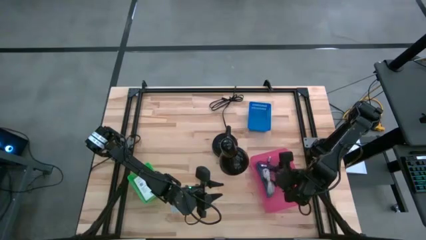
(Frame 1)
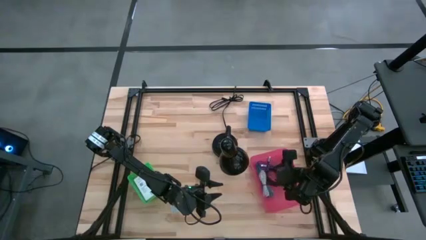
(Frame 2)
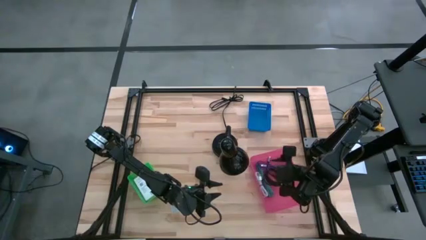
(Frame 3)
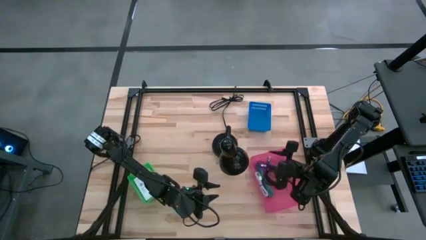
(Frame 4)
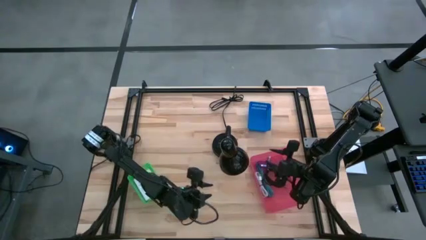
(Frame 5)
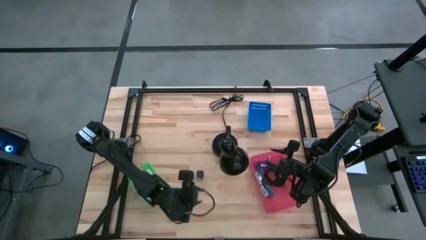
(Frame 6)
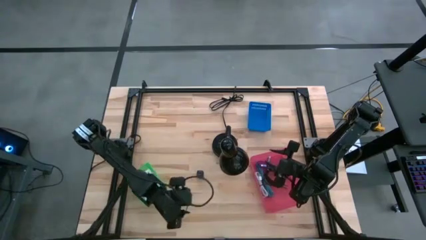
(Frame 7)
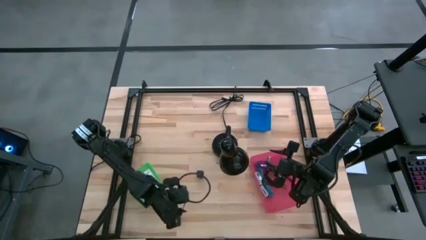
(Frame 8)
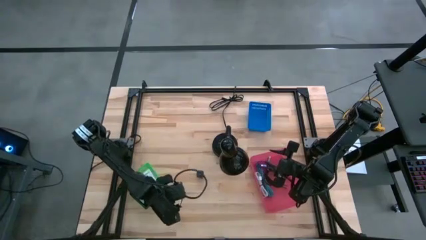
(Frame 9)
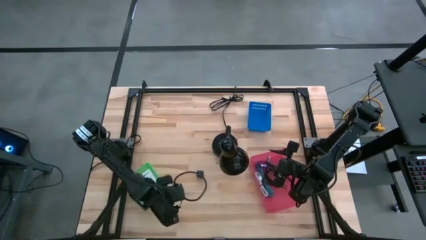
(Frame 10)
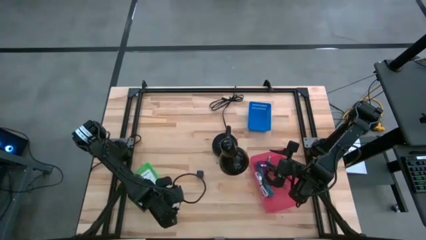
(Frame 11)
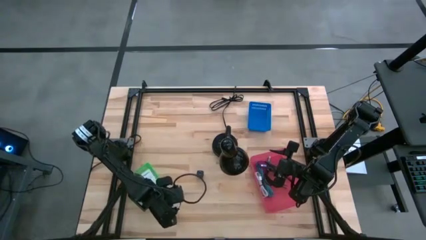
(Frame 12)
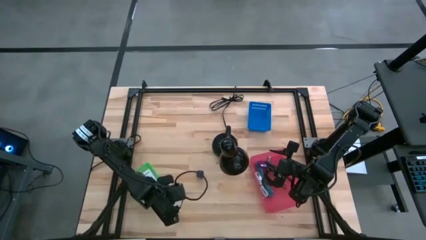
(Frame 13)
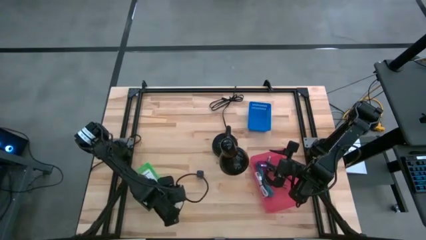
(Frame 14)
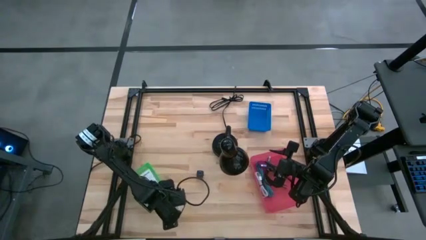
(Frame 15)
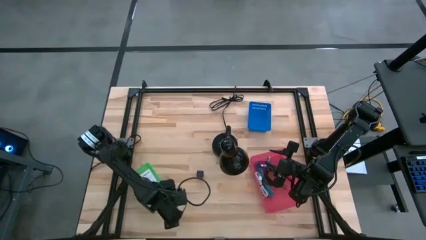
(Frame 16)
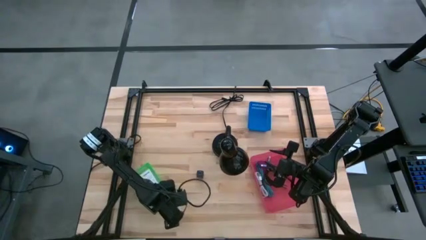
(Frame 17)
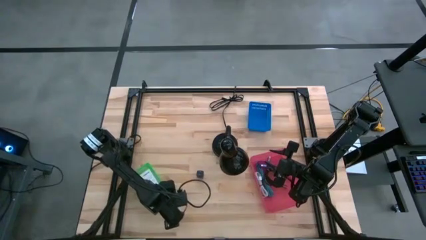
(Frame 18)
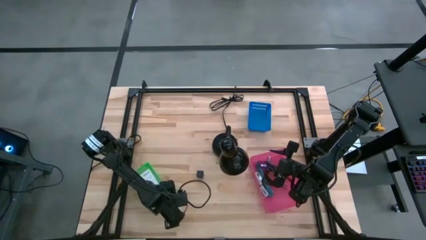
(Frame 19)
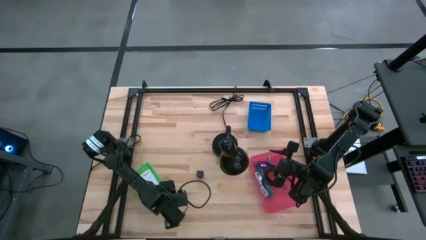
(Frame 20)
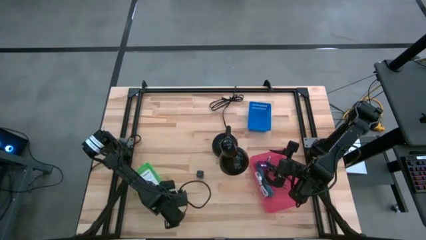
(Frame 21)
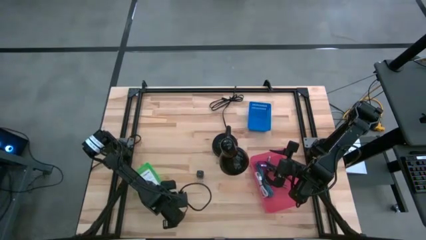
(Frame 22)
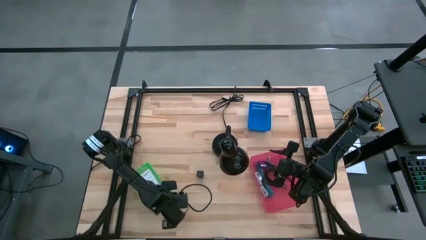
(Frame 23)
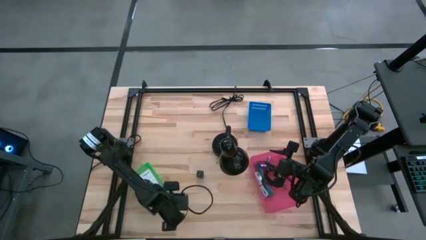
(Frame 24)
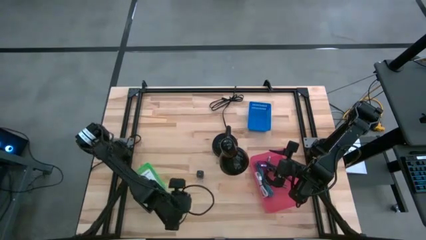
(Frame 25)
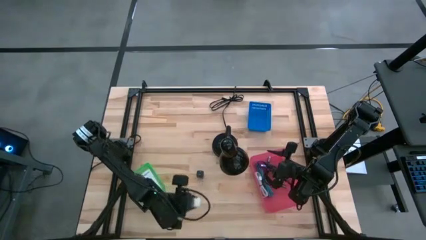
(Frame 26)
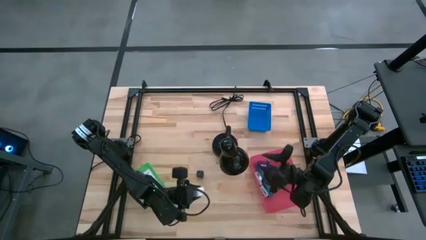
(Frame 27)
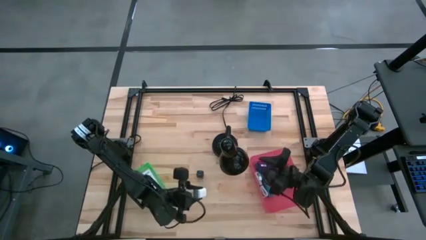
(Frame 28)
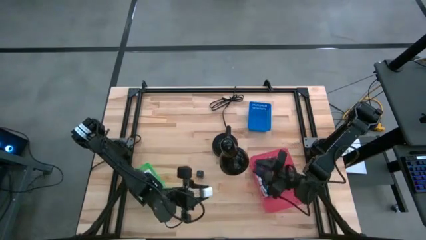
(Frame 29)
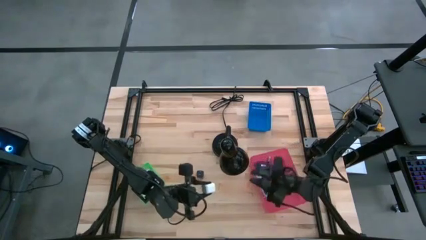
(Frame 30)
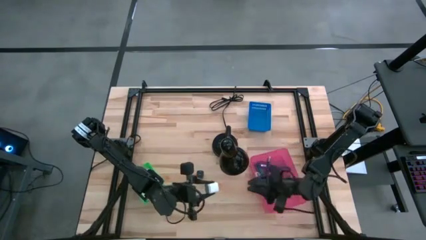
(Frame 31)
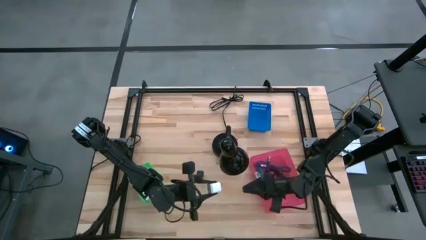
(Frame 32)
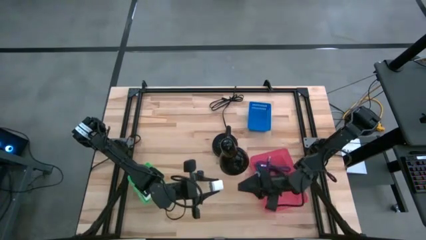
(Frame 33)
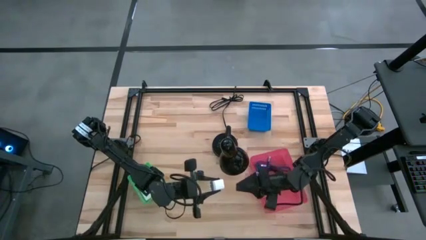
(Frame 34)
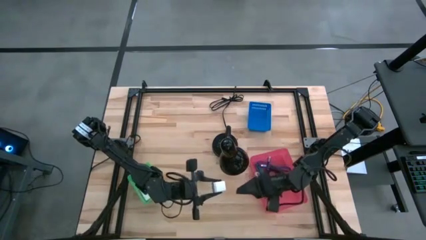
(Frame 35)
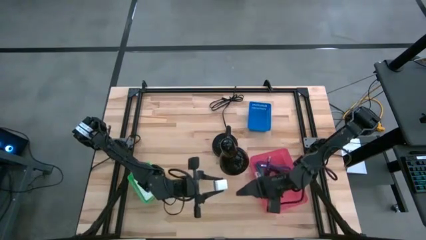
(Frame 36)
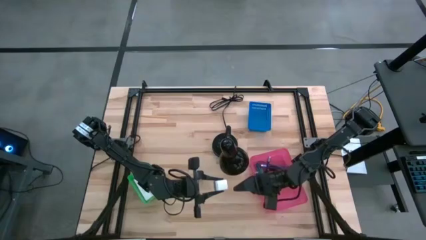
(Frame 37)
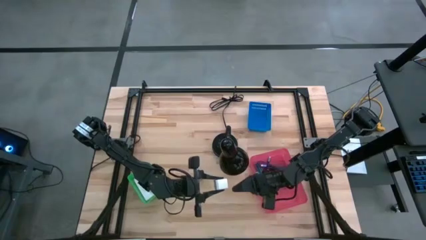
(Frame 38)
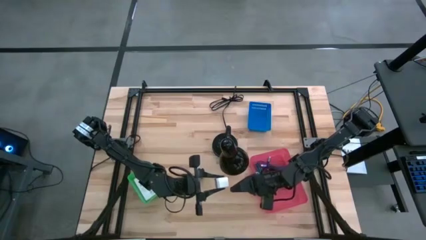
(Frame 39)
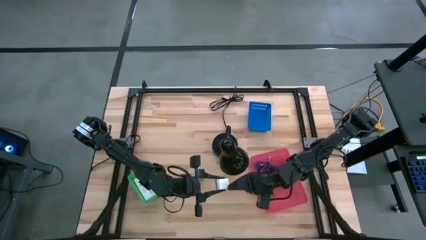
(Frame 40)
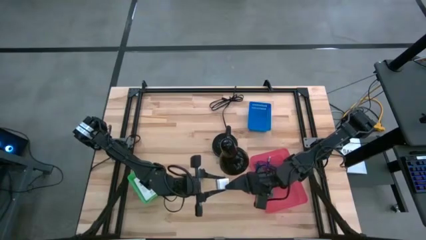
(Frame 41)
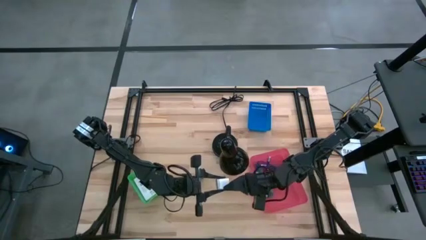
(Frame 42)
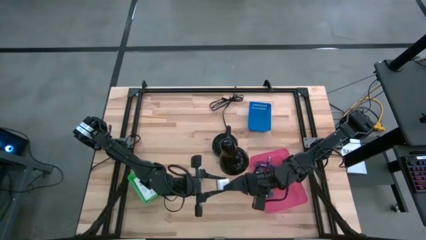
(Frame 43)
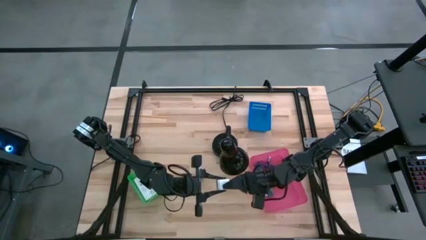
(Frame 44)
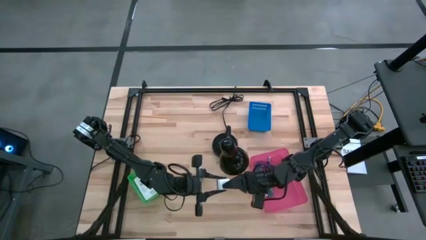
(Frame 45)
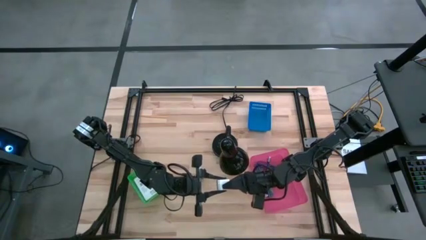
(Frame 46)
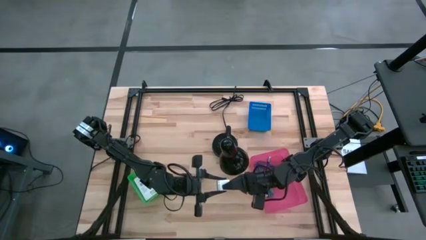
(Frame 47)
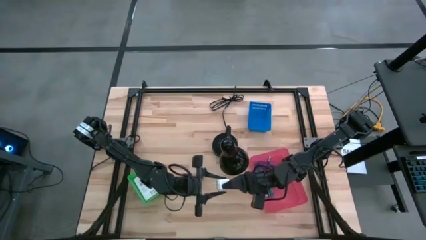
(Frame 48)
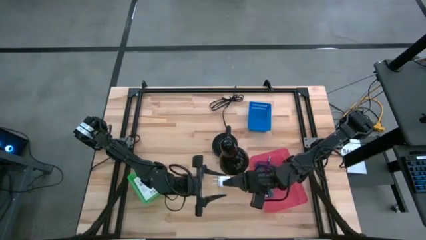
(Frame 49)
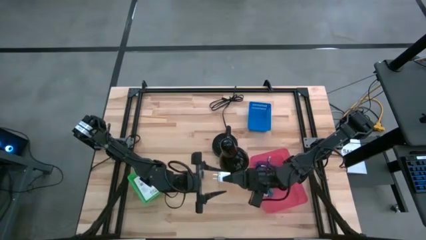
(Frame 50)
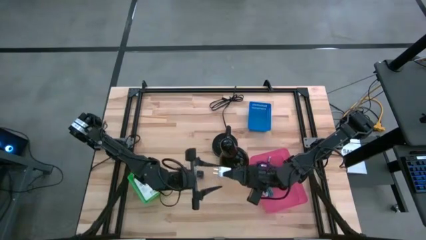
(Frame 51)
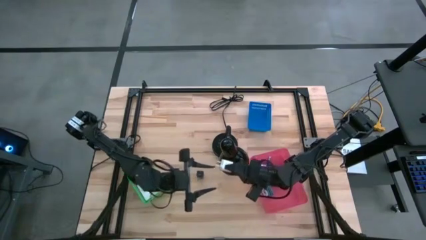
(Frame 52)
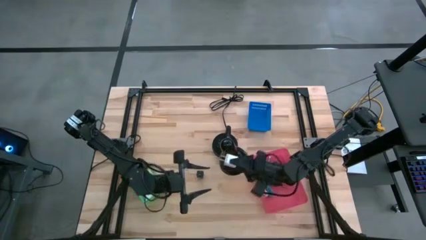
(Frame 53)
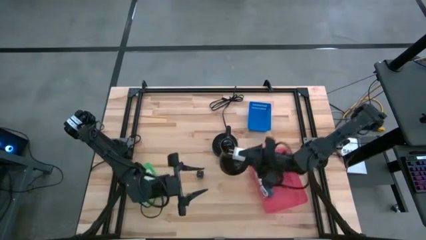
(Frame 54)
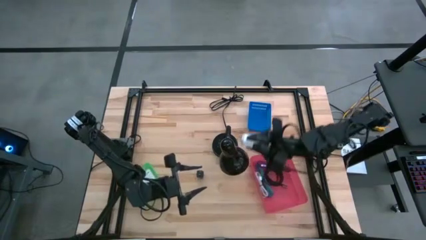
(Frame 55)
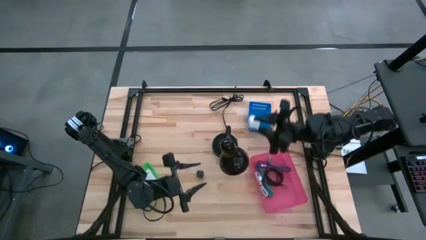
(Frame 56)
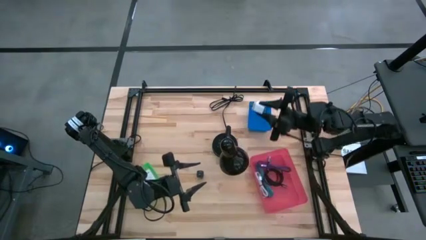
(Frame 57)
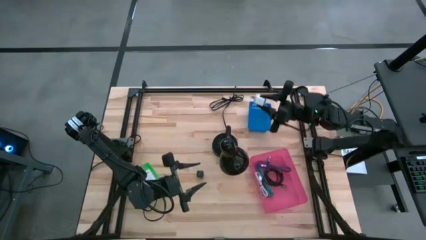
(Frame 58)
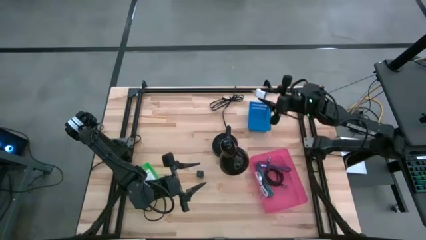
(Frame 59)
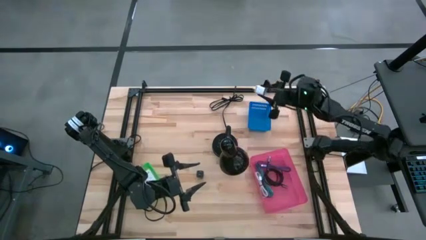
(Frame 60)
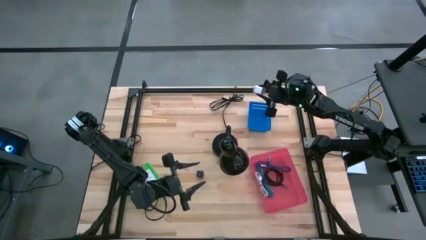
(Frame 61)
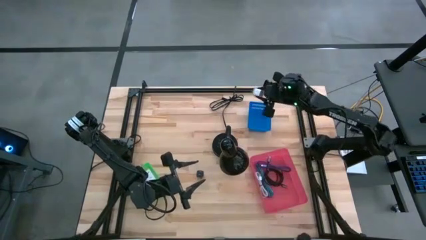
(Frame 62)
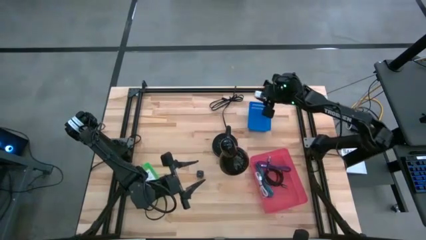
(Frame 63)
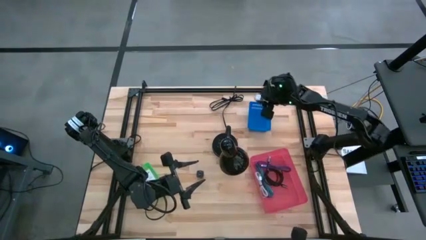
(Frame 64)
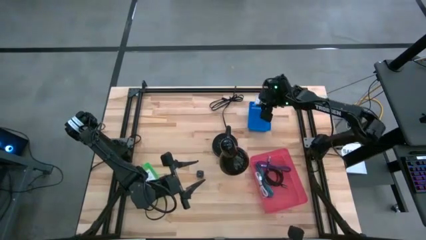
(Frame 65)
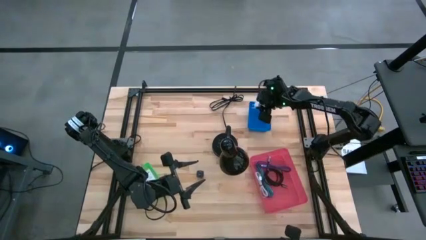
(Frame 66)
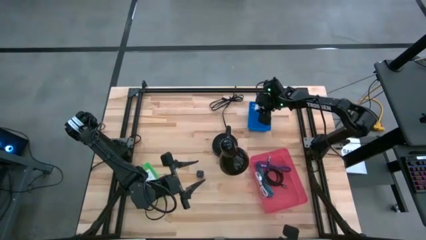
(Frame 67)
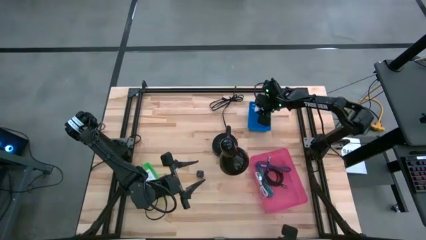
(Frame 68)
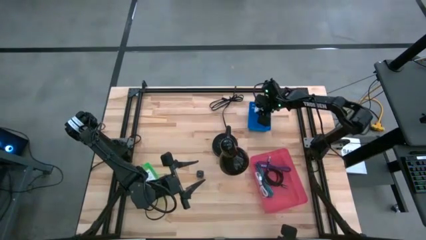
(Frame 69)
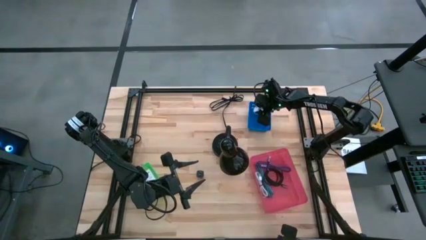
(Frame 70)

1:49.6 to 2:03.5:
Task: Pick and place items into bin
Put the white charger adapter into the blue bin

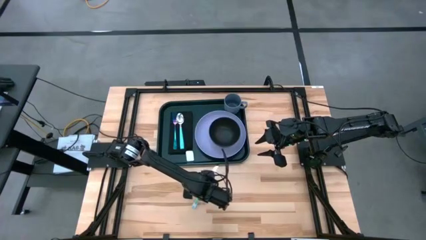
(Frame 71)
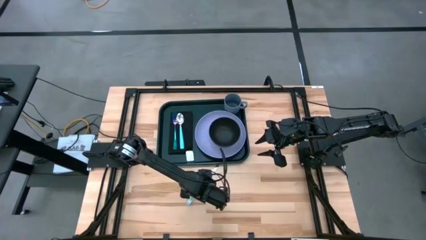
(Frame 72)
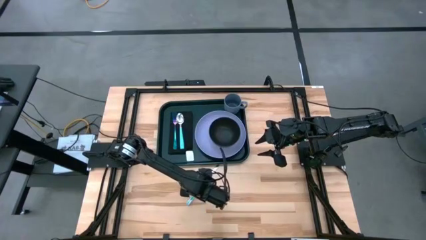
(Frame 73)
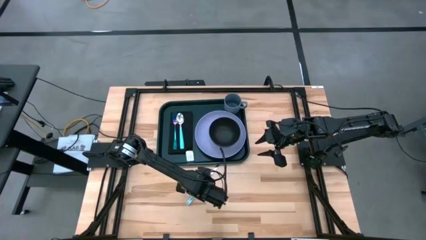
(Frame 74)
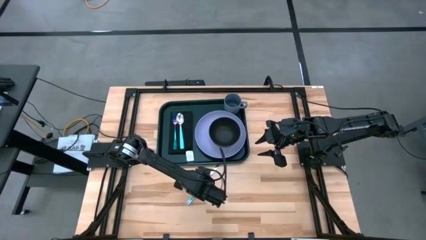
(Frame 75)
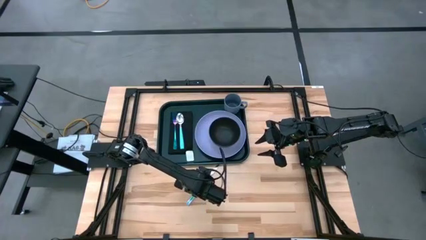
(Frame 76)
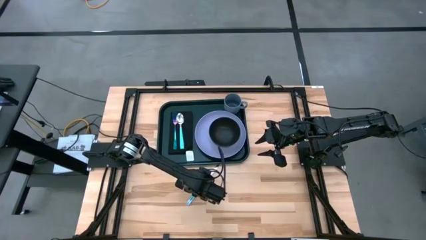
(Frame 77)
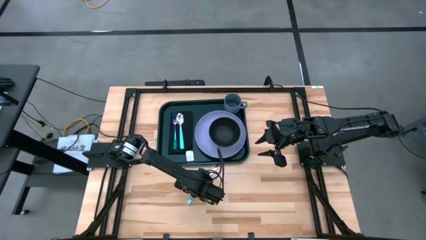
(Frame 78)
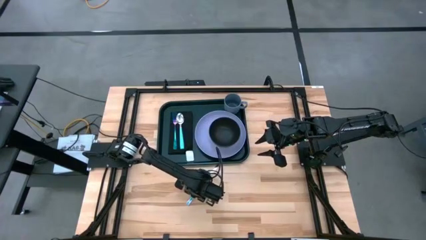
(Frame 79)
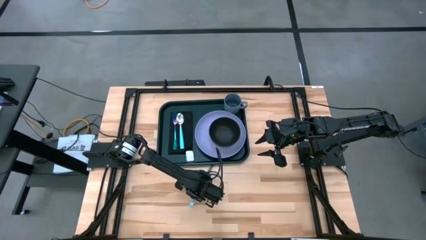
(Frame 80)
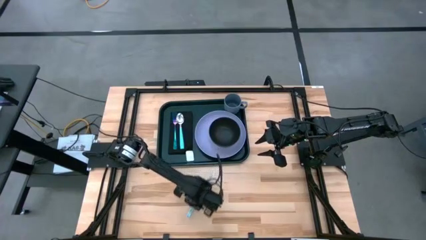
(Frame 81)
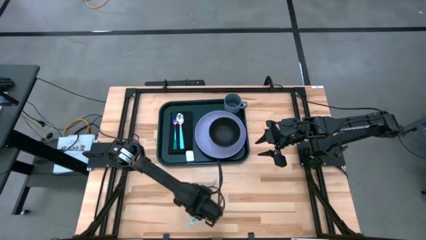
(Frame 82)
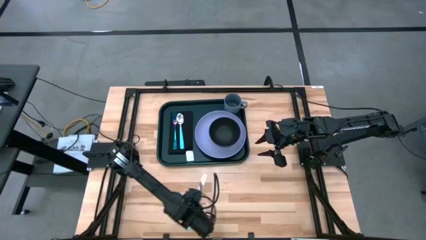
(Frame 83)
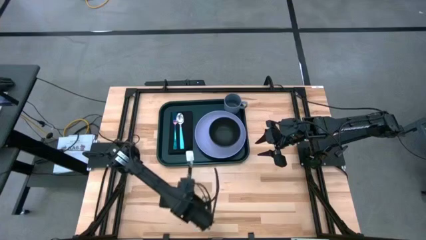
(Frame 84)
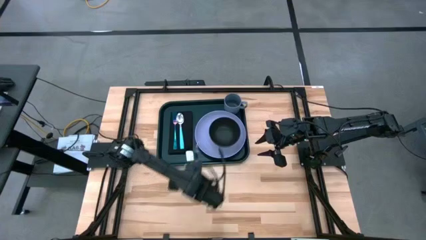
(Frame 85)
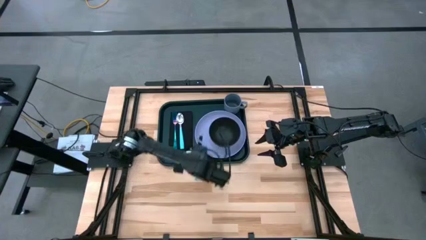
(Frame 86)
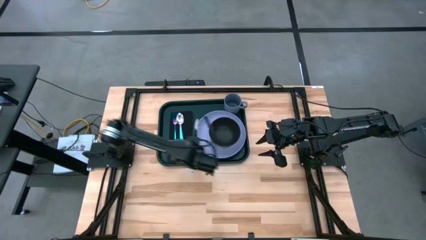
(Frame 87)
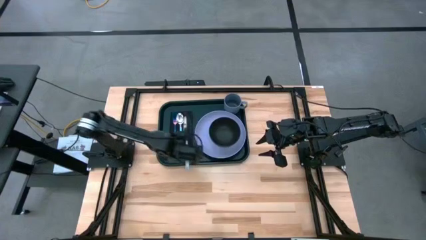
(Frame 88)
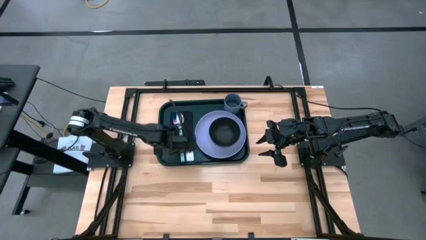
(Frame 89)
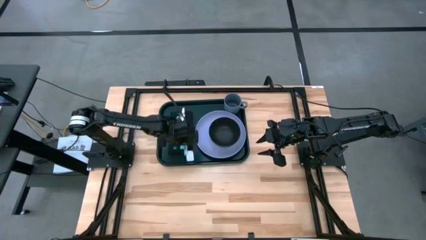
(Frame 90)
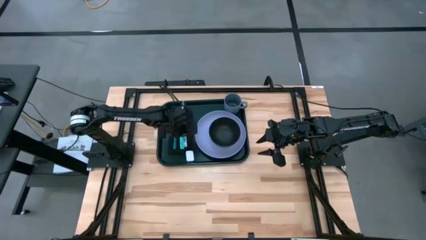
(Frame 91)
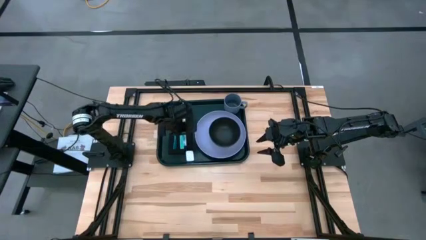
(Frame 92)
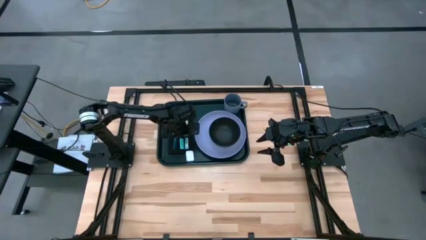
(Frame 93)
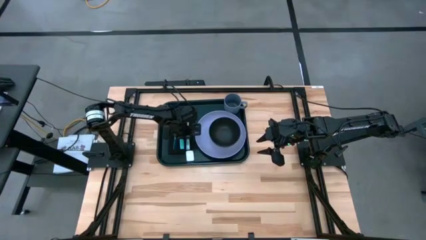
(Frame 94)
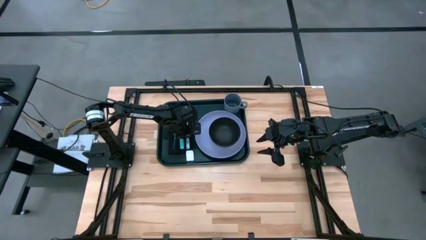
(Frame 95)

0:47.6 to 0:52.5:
Task: Set up tray
Put the blue knife on the black napkin to the right of the blue spoon
